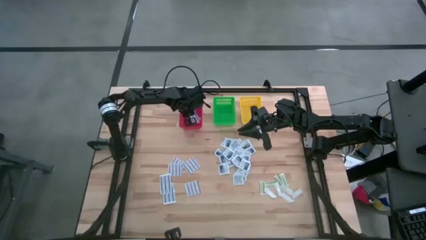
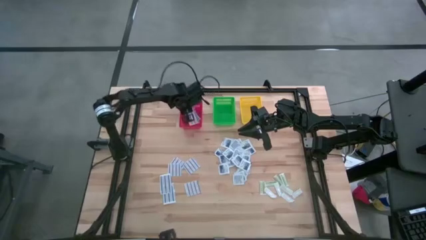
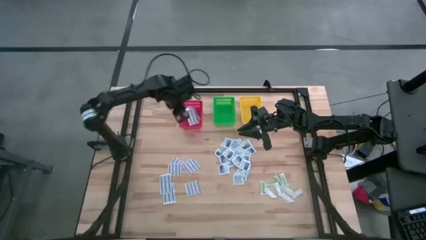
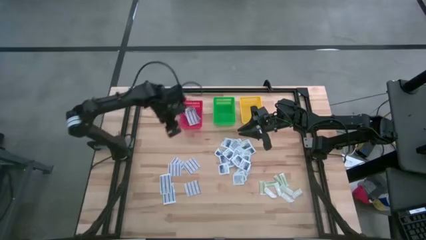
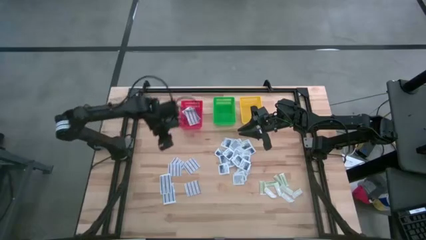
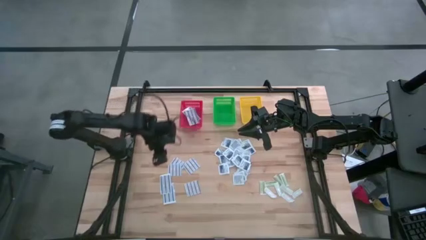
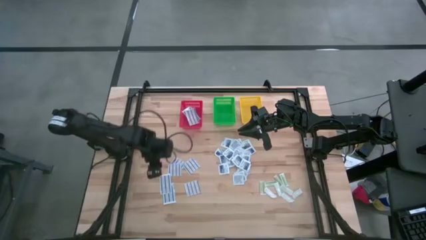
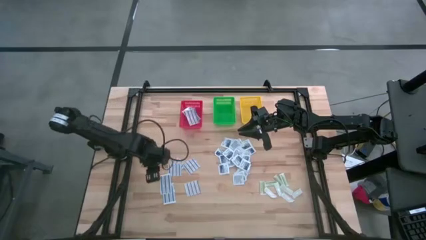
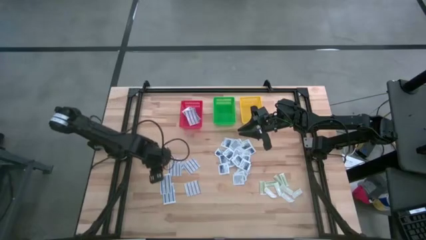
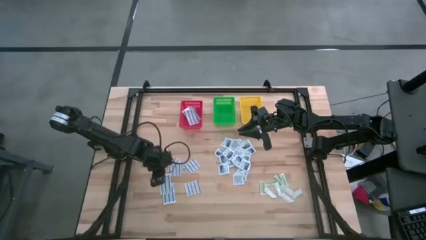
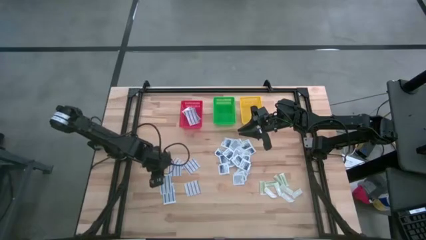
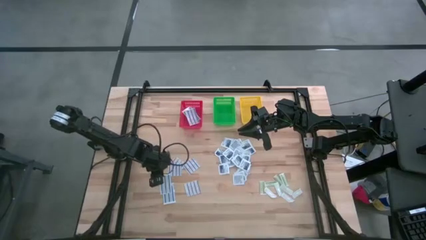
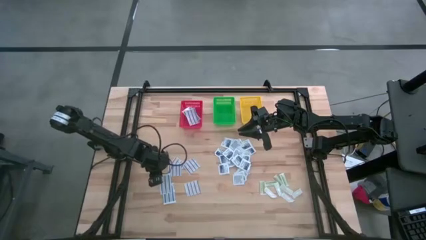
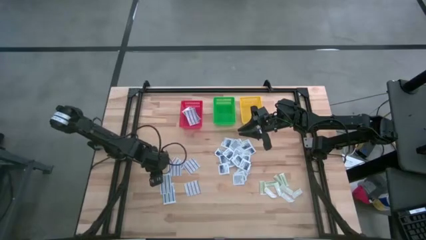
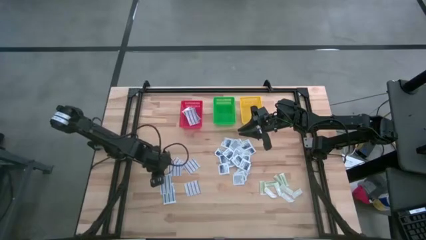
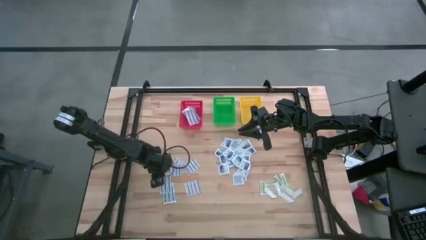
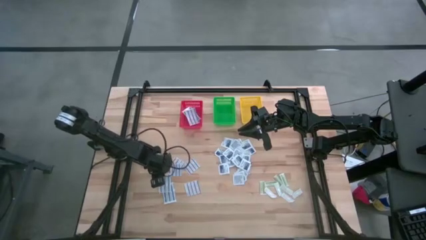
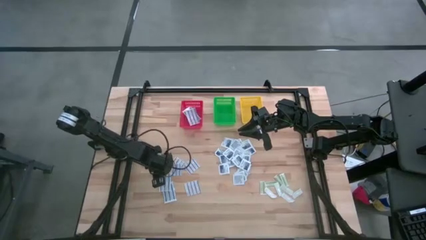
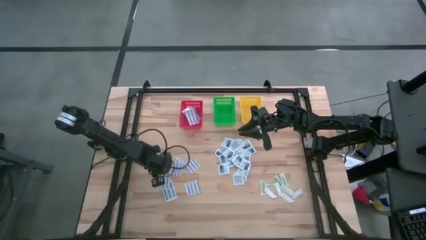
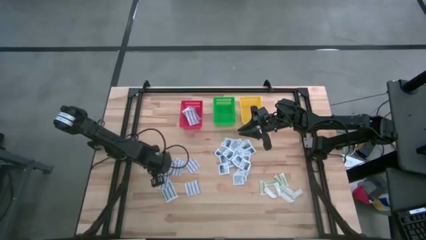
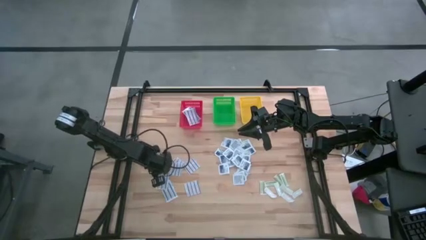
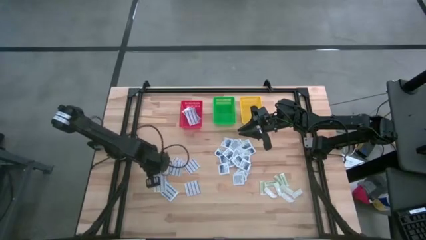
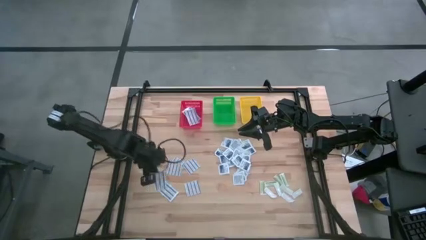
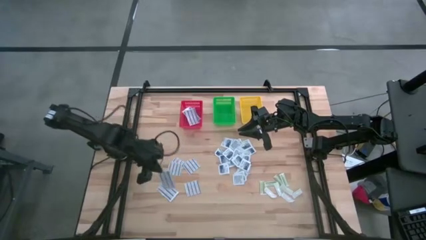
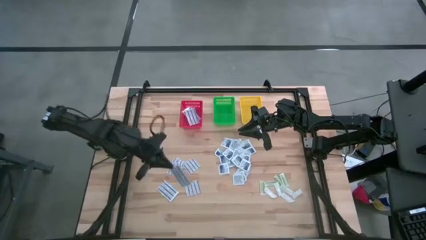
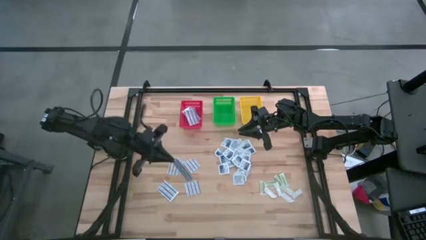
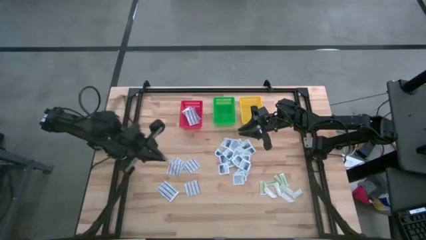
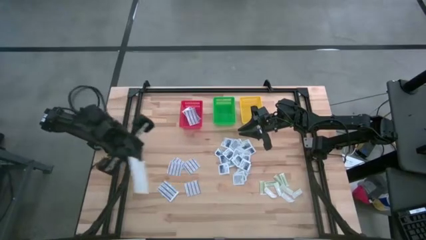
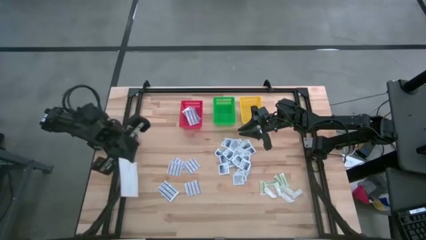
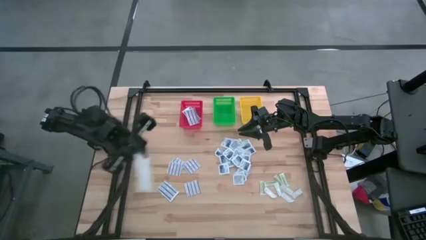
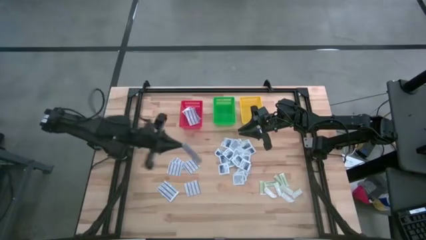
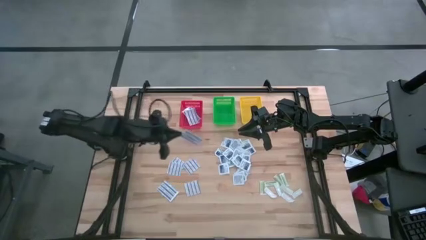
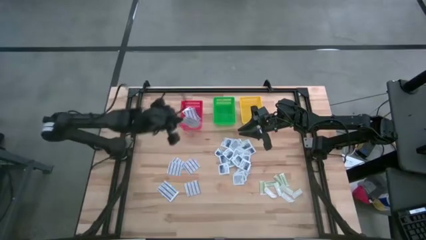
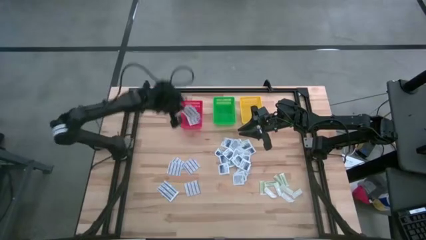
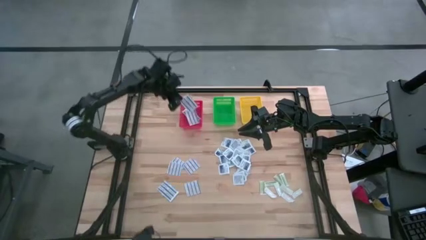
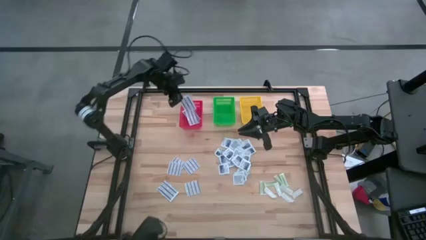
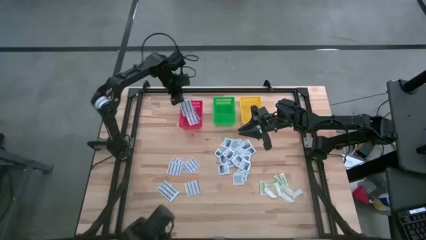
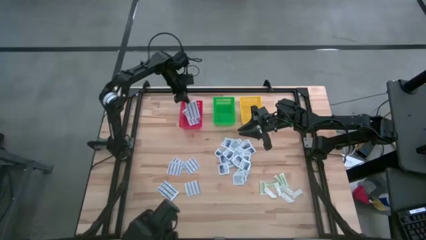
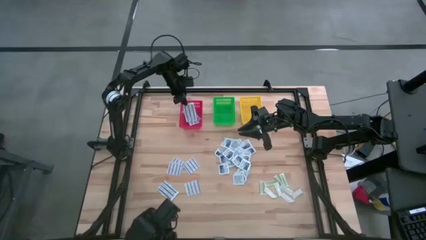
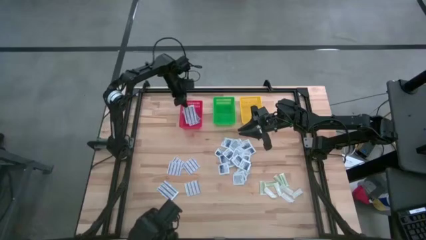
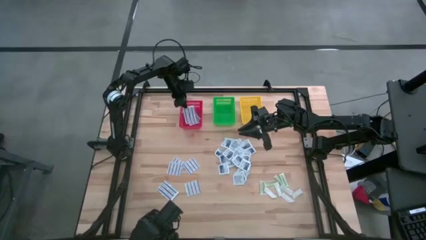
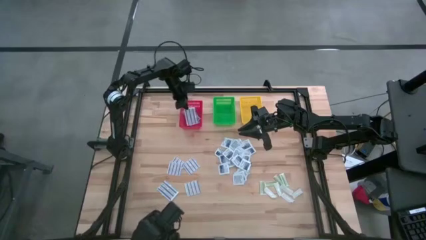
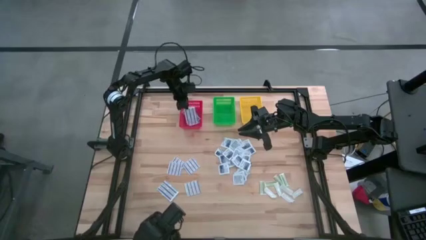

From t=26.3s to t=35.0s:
Task: Pick & Place First Aid Supplies
Put the blue bandage into the red basket

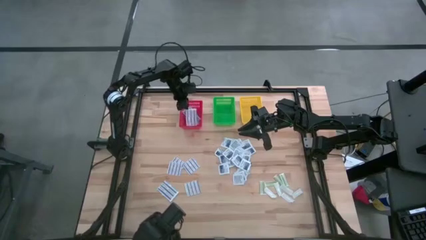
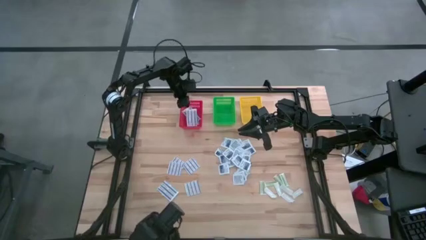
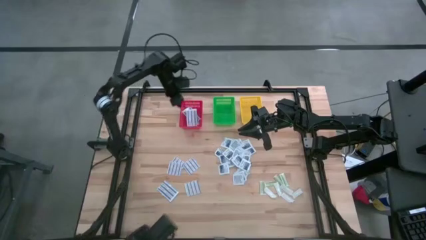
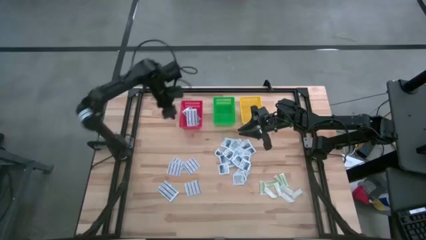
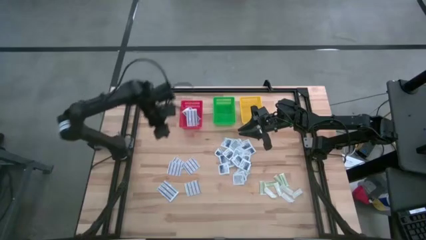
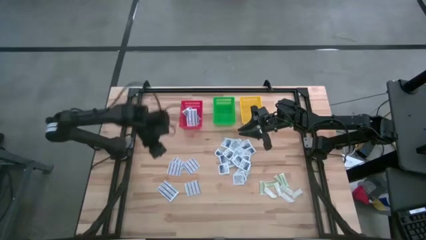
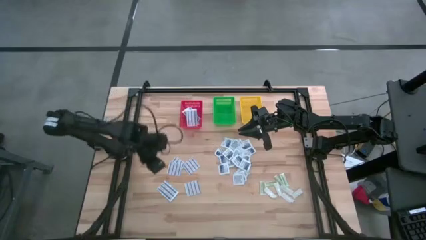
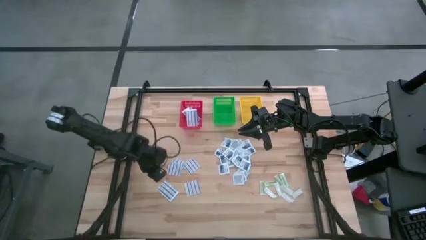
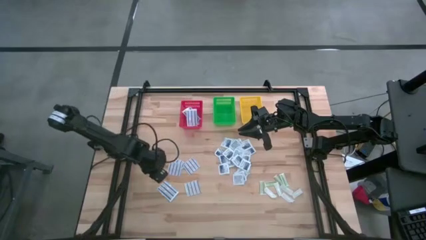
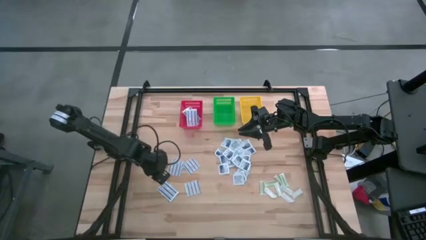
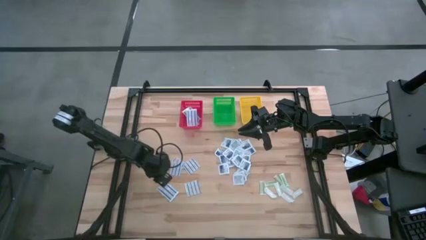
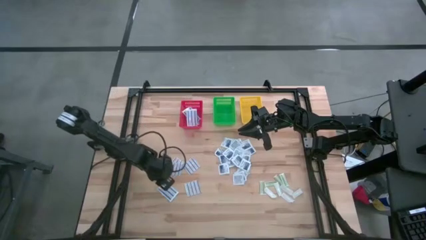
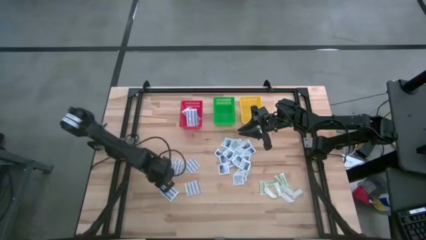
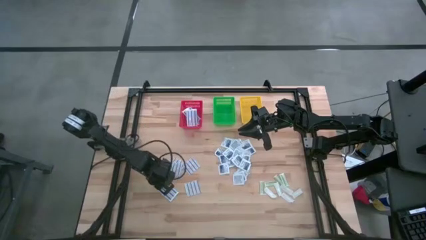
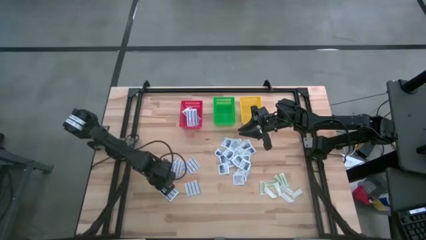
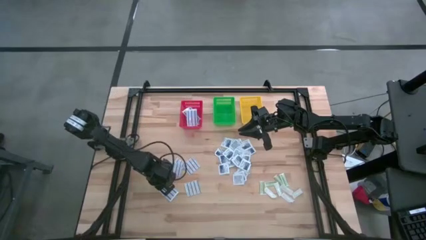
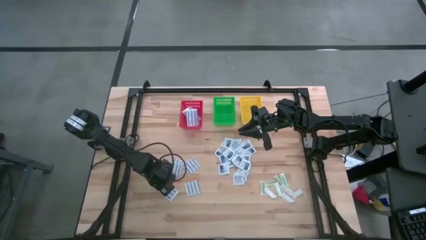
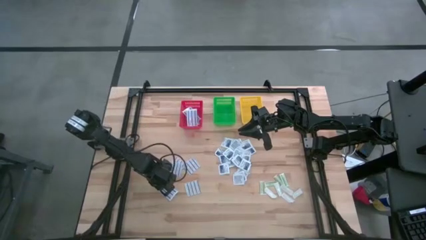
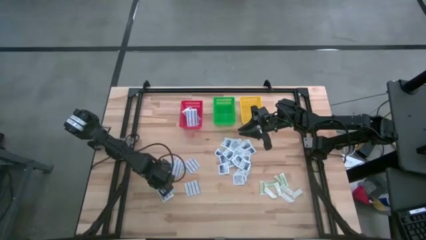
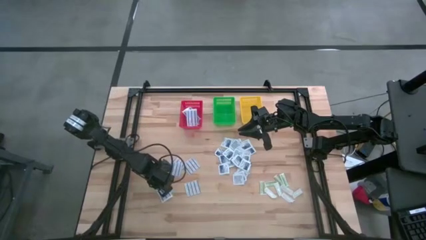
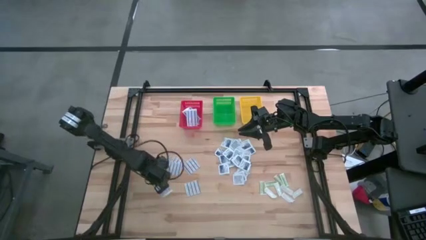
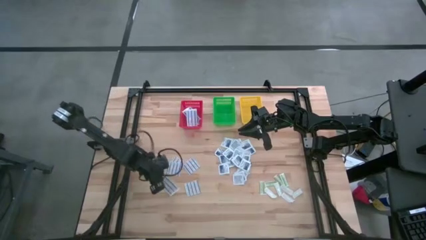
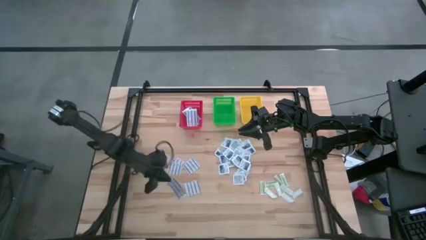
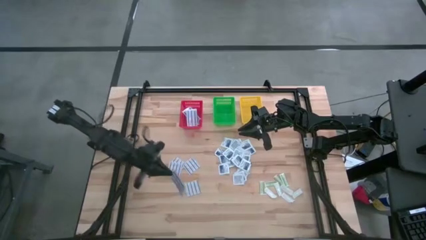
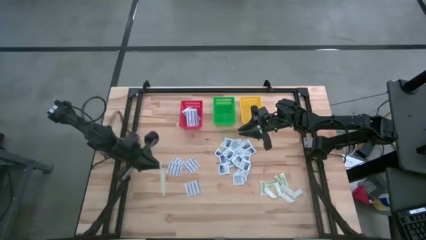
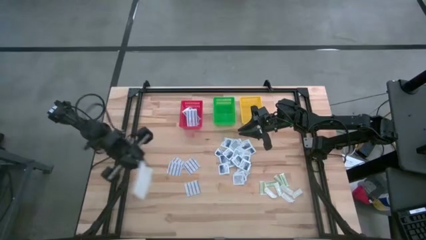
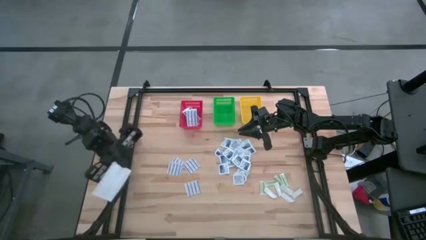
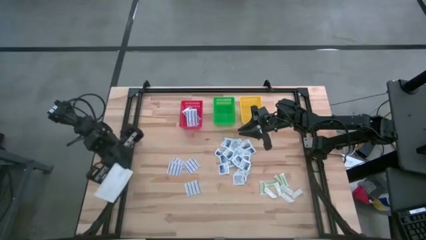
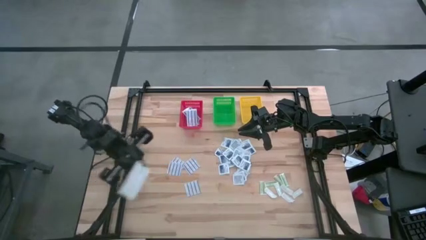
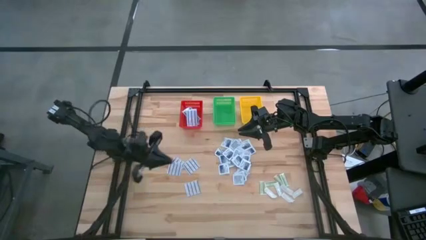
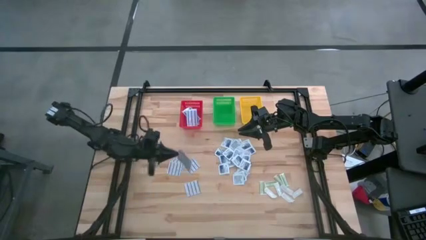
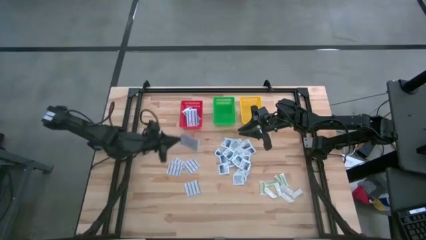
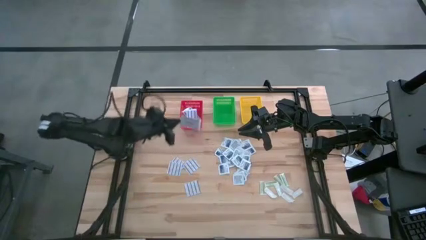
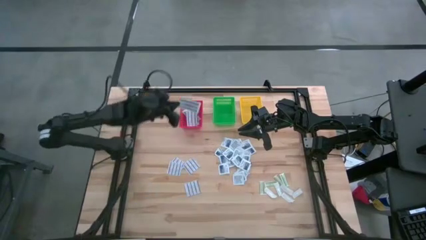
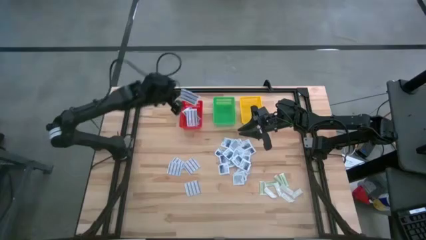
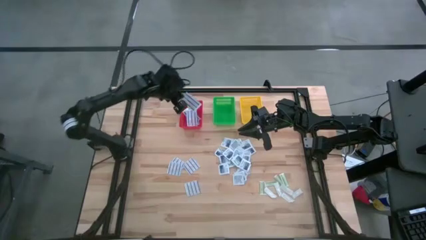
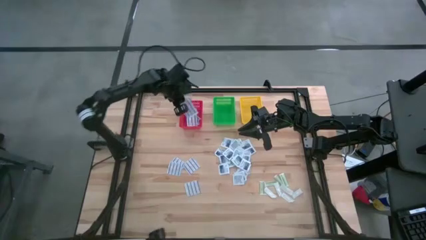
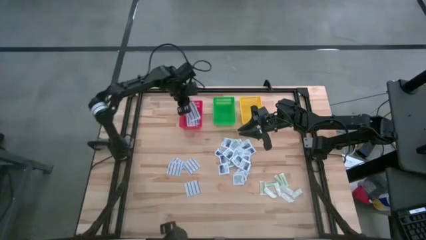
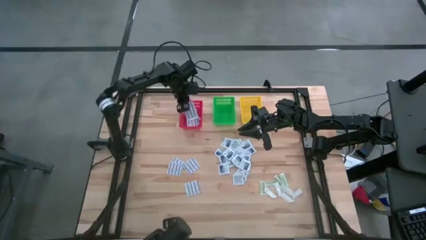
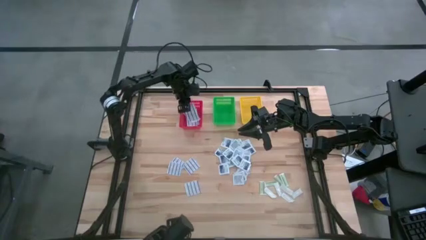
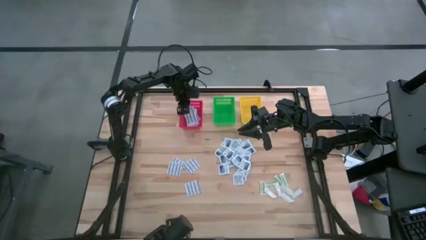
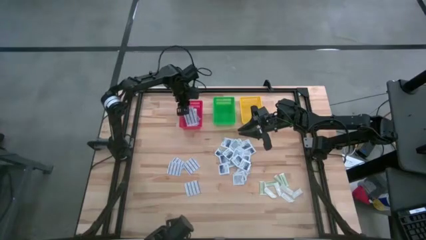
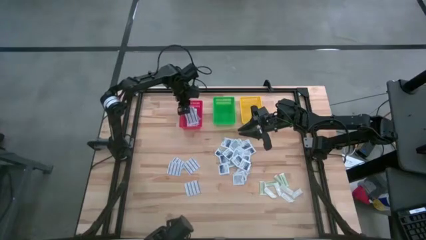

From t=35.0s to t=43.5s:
Put the blue bandage into the red basket
